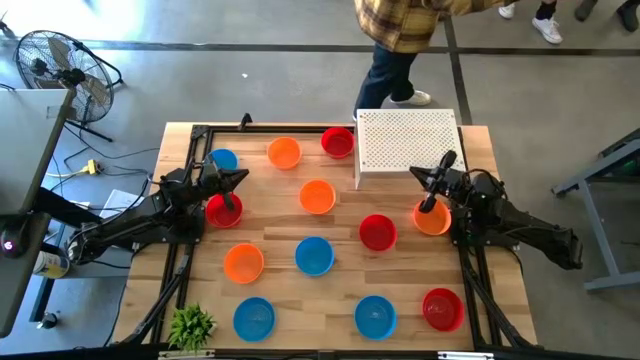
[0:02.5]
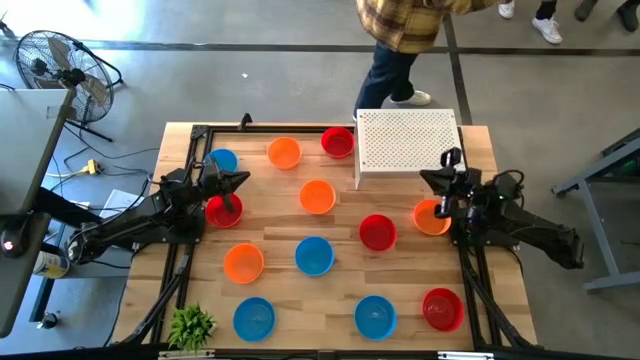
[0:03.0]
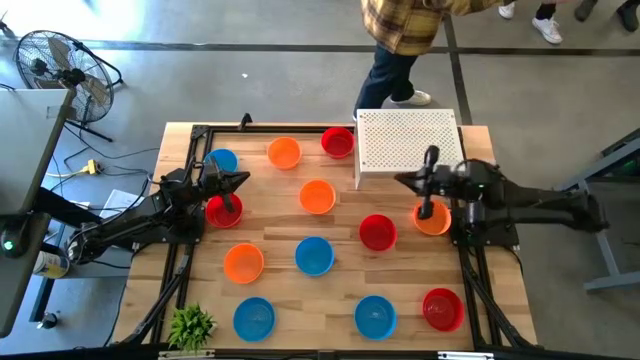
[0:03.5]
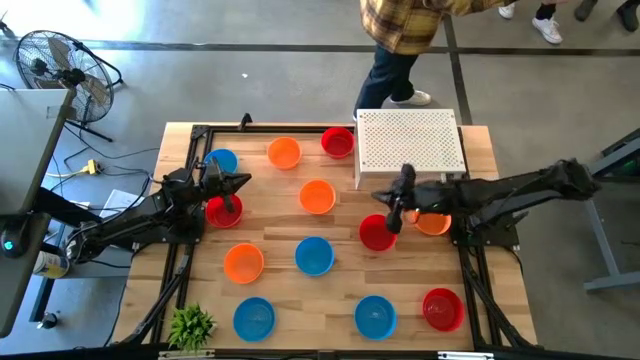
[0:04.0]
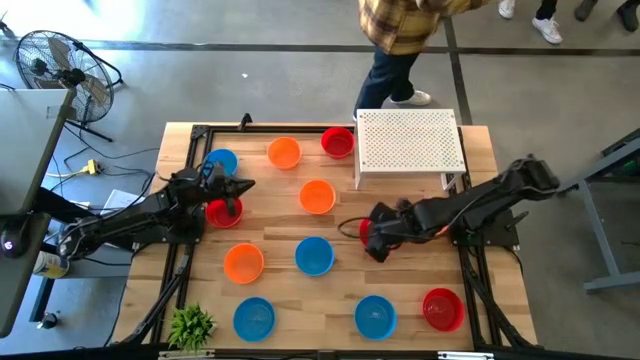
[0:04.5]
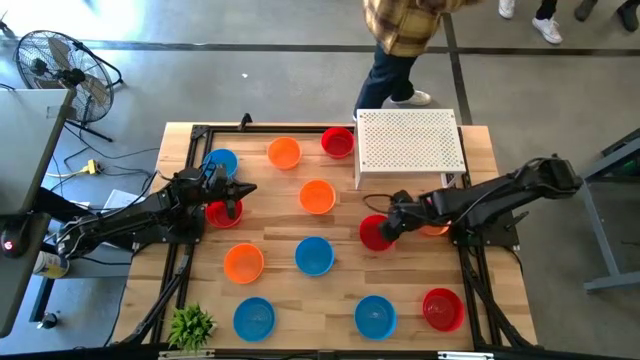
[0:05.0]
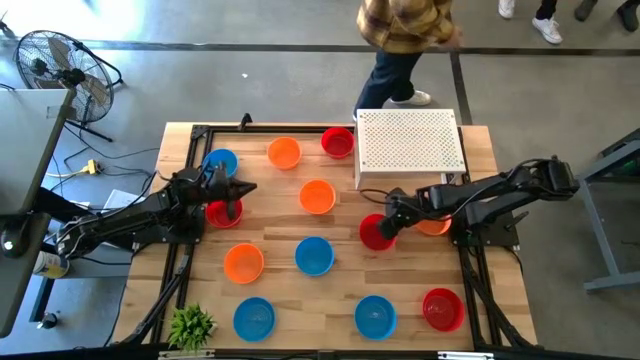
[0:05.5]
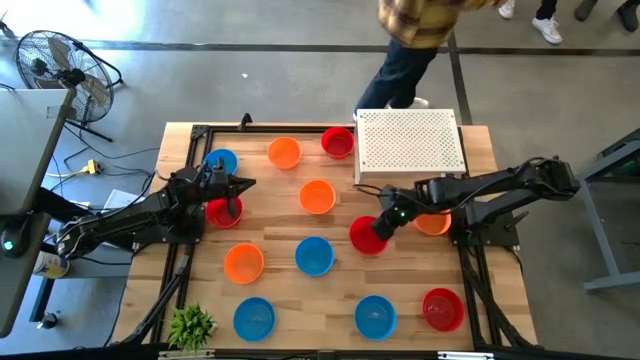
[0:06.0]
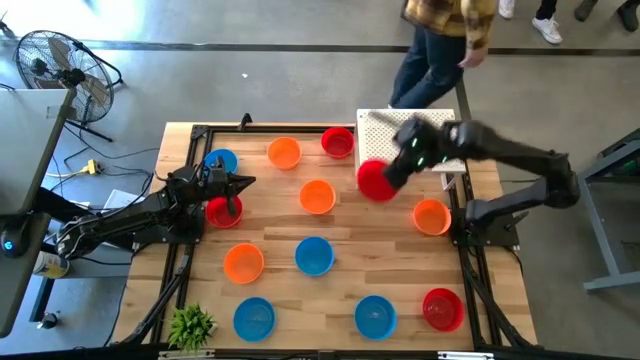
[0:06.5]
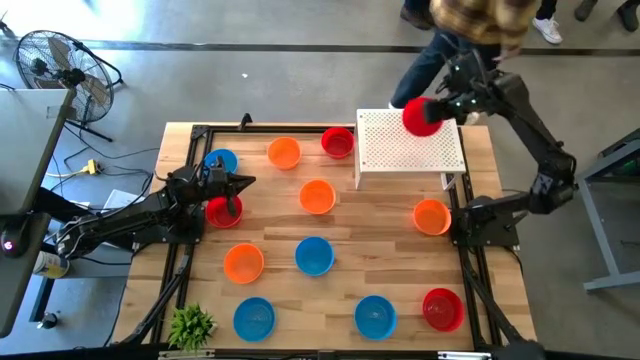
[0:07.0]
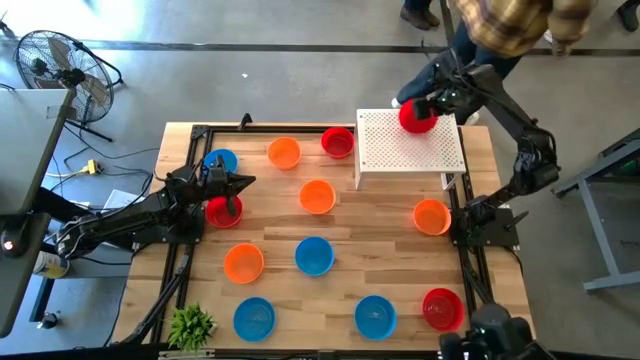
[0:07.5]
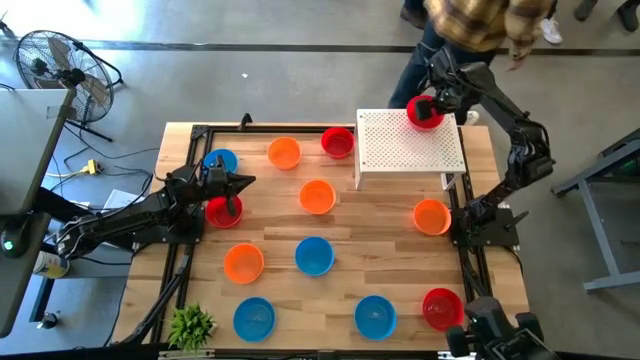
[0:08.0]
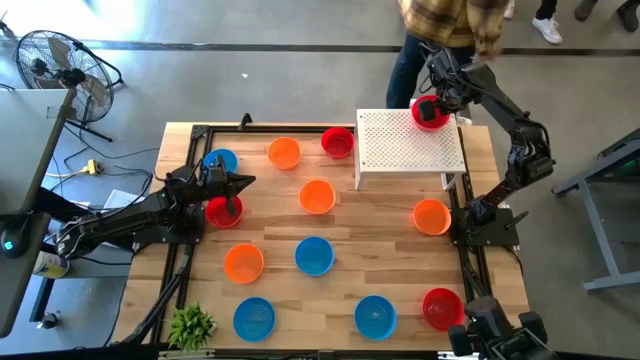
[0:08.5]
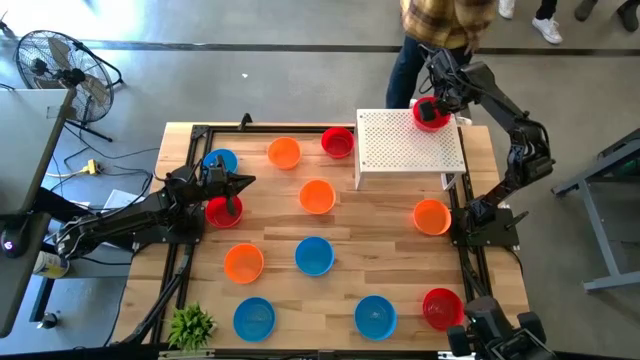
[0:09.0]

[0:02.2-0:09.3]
Task: Pick & Place Mini bowls
Put the red bowl on the shelf

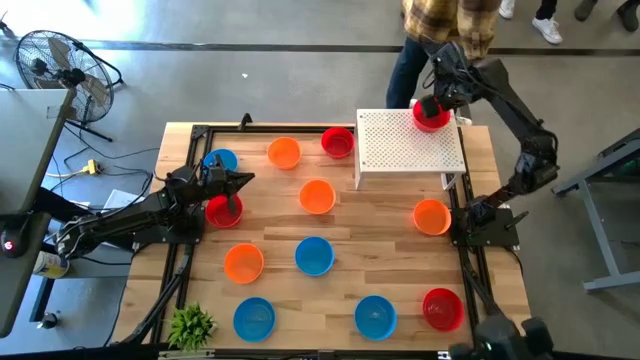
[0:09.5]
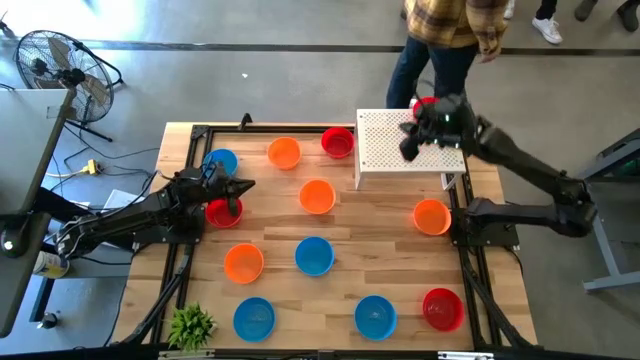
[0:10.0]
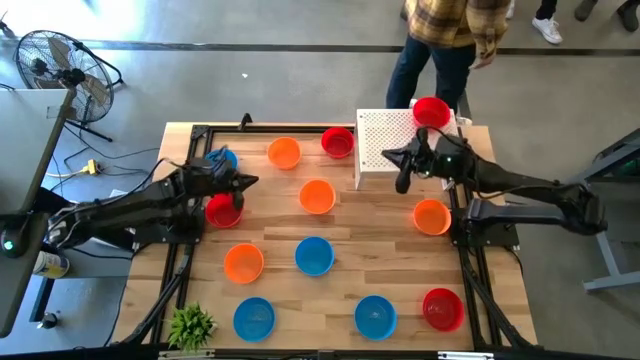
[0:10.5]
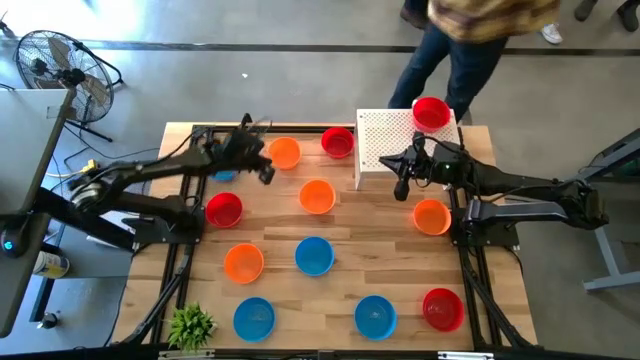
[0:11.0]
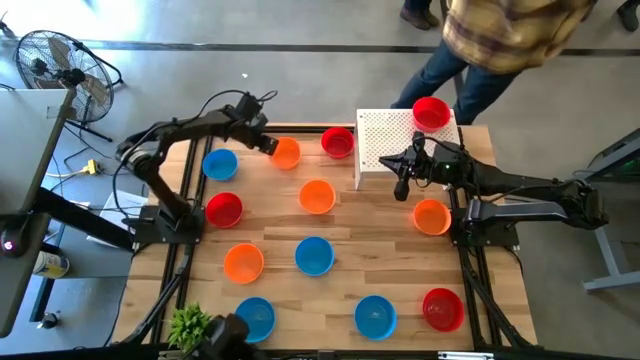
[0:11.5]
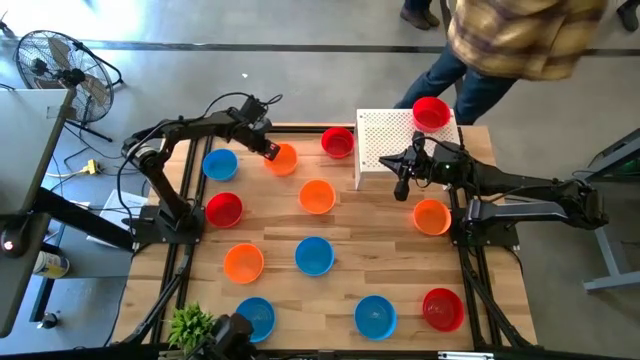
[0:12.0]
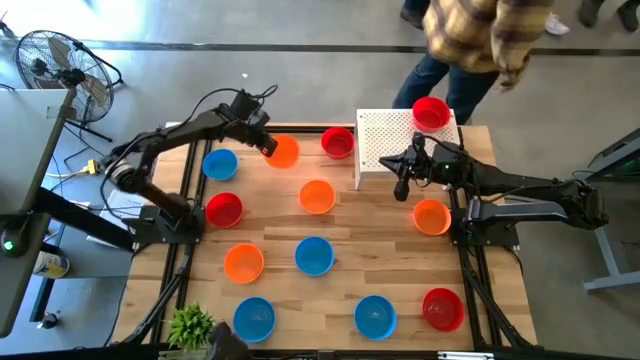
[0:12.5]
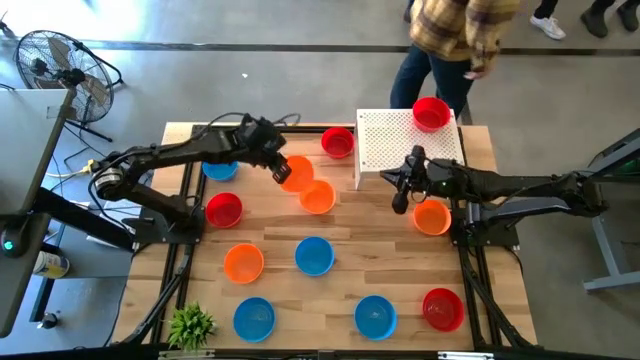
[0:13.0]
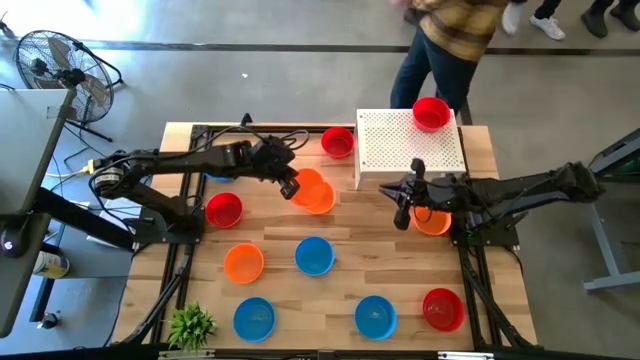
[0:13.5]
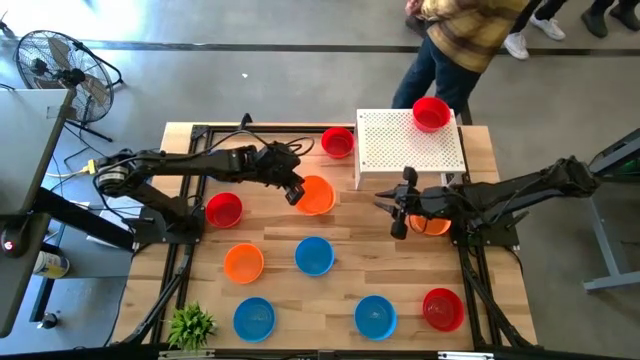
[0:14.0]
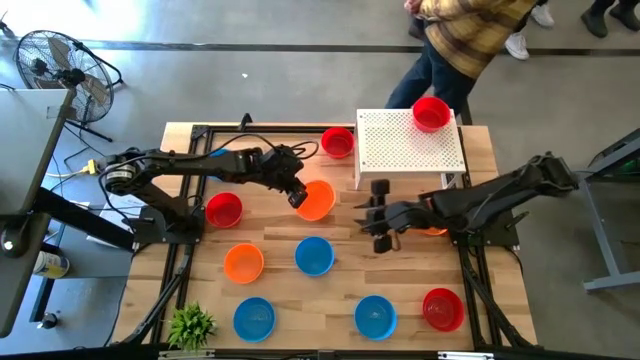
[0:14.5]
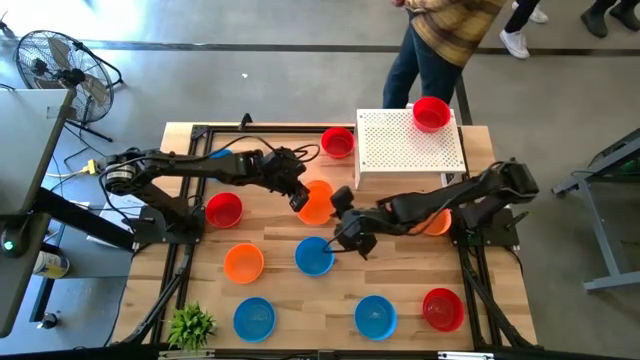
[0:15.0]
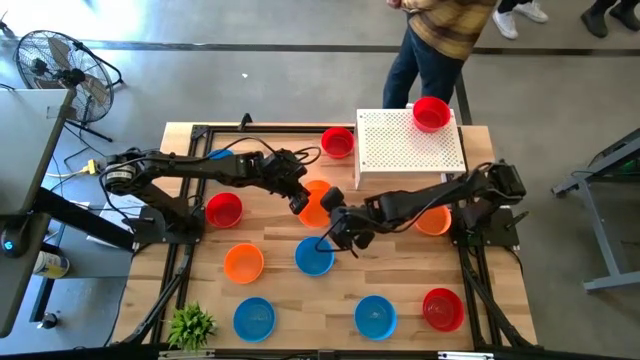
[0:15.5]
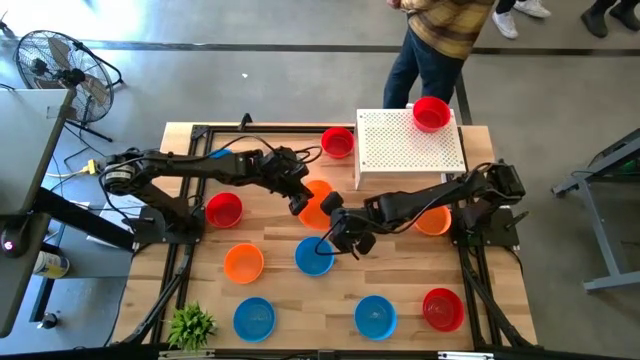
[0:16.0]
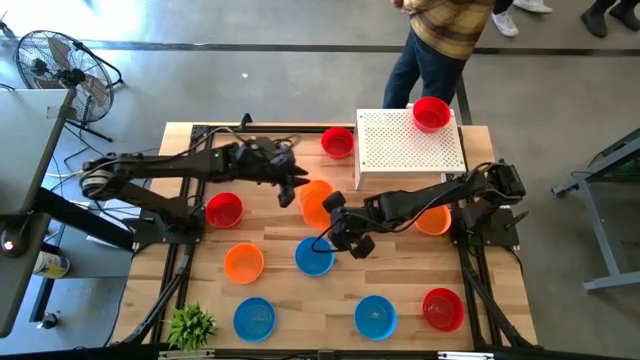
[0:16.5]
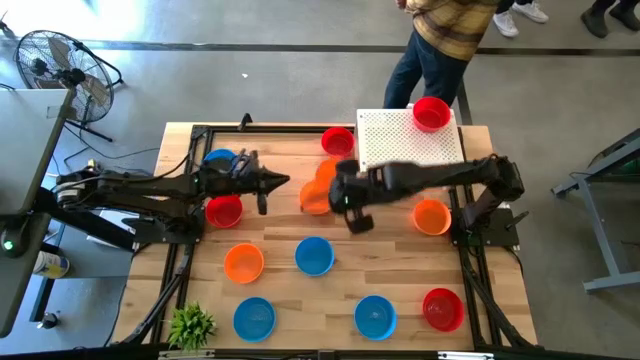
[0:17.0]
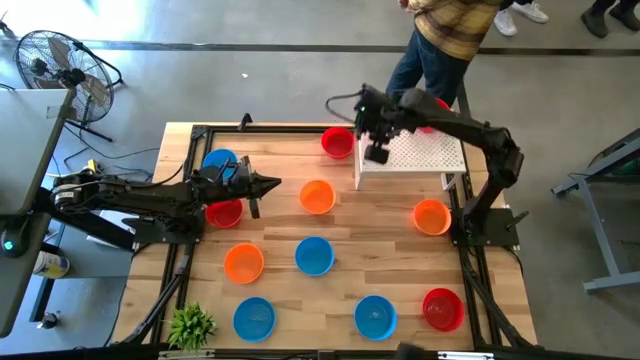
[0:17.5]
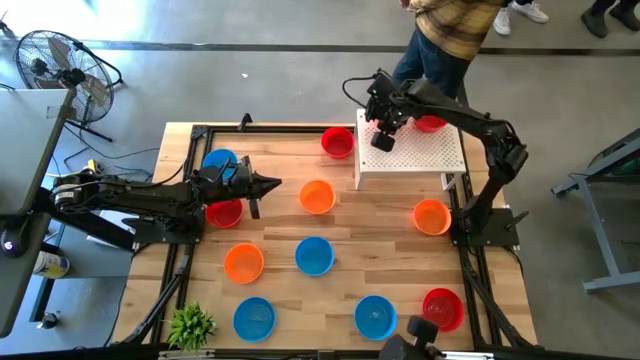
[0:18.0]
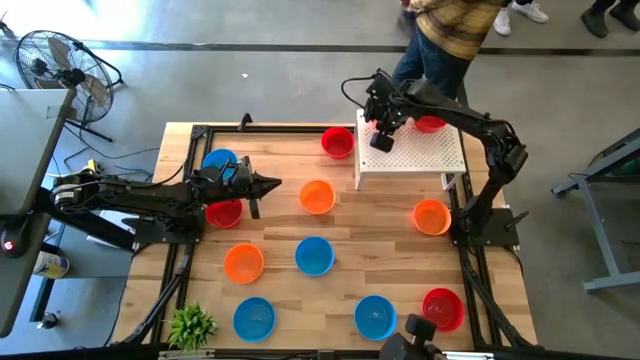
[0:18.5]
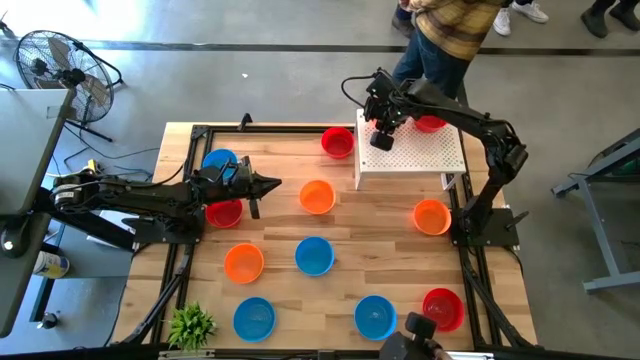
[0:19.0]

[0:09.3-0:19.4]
Put the orange bowl on the shelf

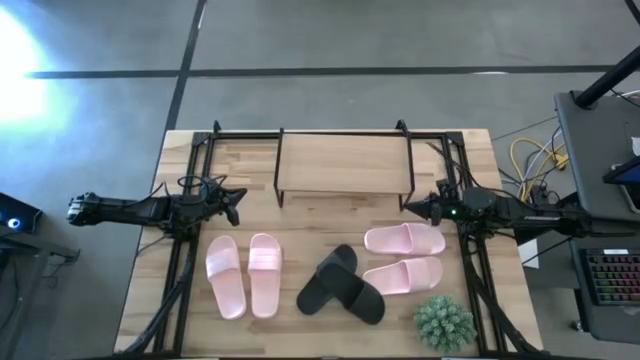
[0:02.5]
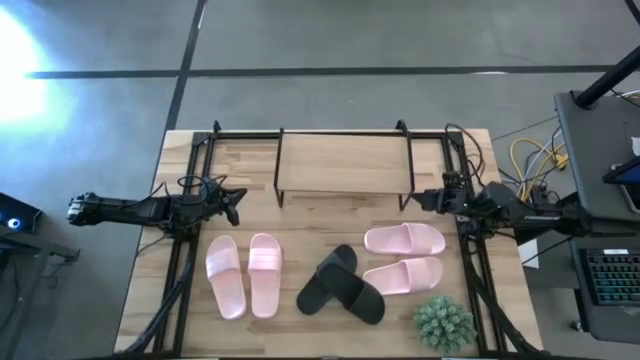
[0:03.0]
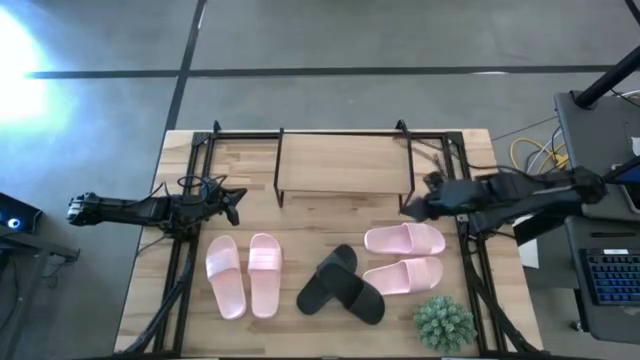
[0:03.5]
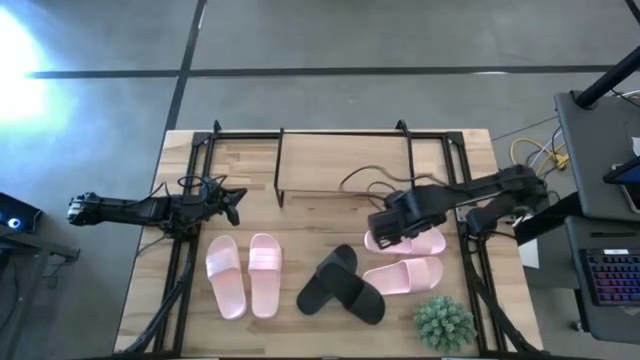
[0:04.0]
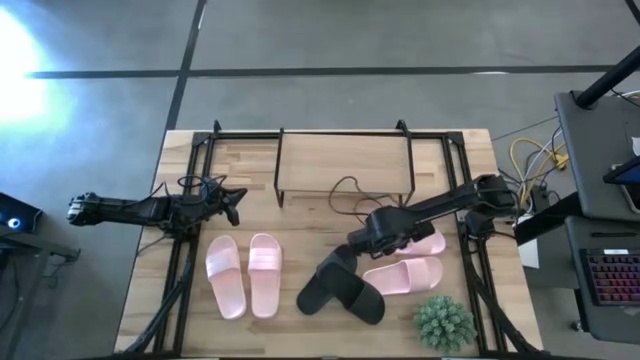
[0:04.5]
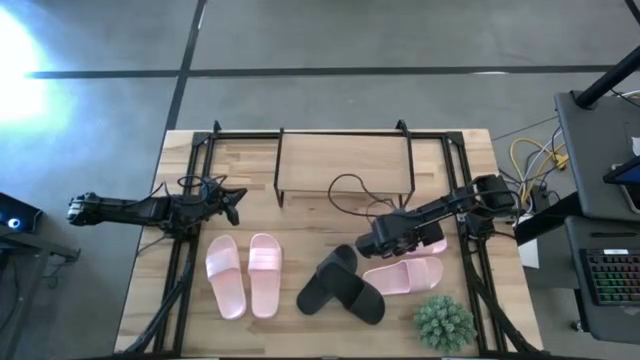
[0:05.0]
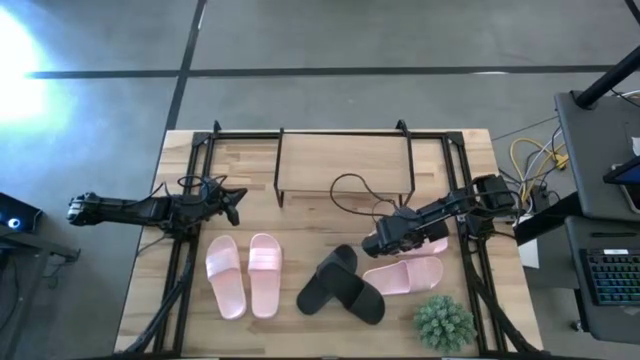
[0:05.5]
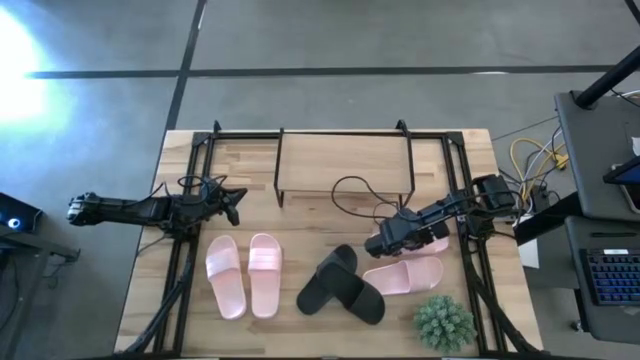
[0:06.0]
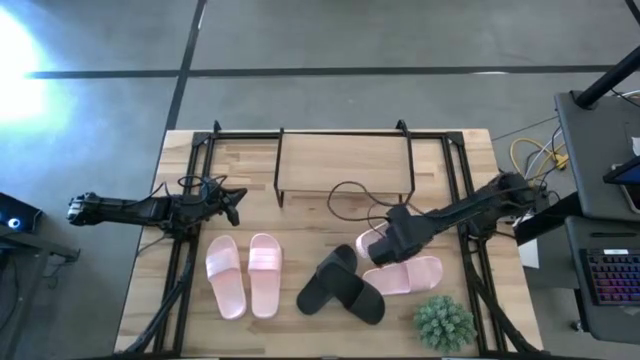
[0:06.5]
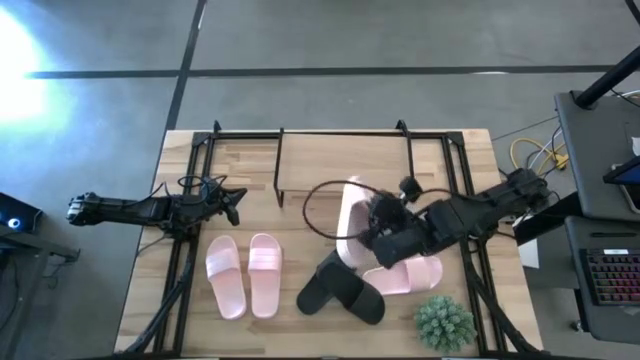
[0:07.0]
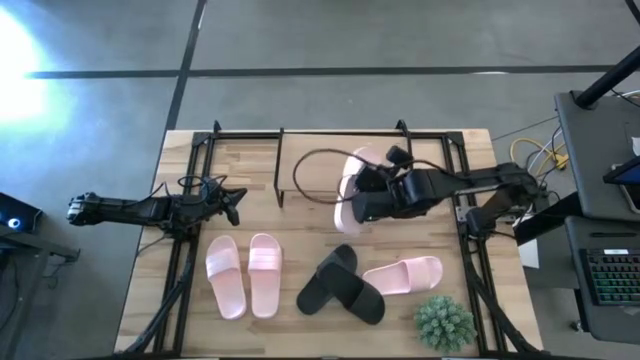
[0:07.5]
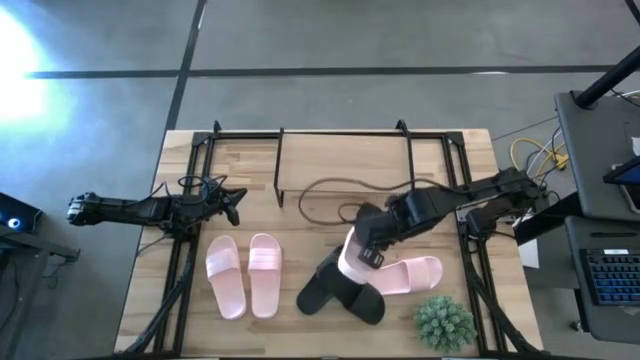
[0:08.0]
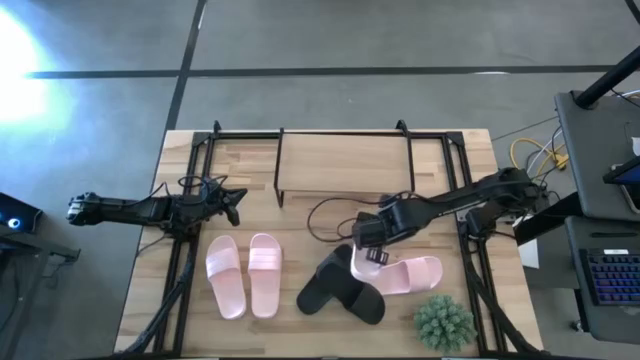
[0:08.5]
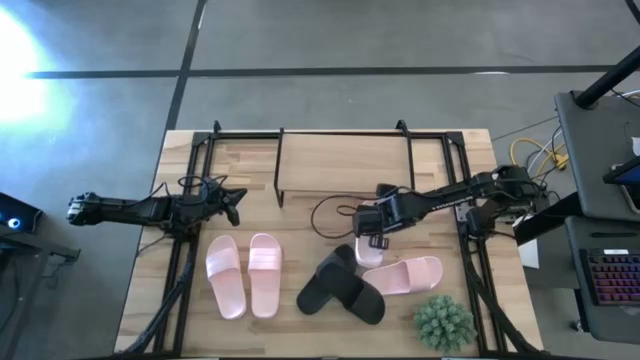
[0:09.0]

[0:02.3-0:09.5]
Task: Pick and place slides into the shelf
Put the pink slide under the shelf
